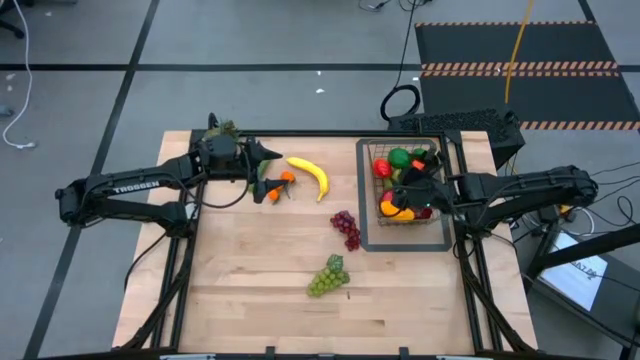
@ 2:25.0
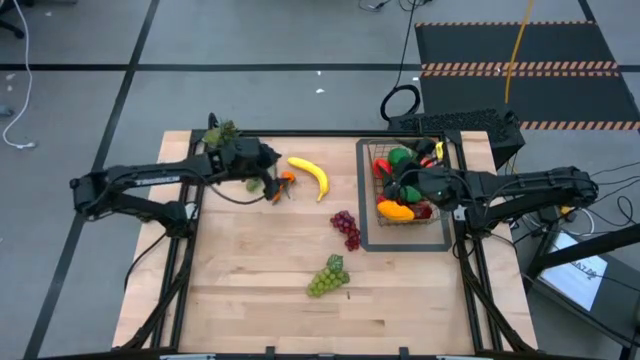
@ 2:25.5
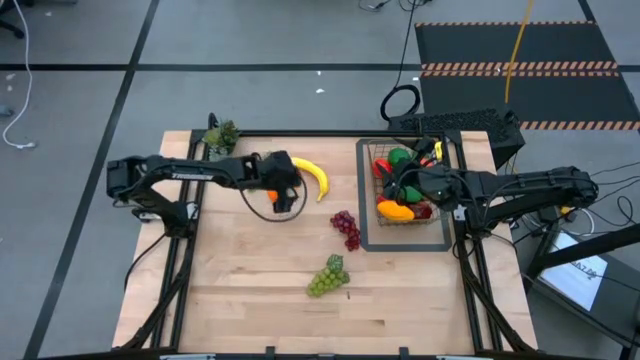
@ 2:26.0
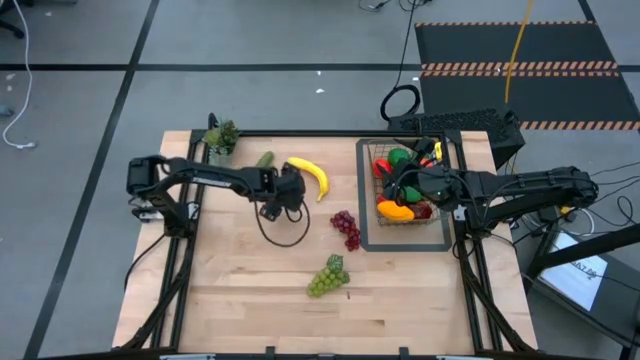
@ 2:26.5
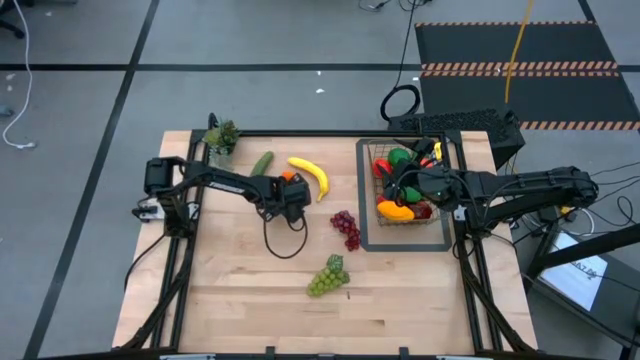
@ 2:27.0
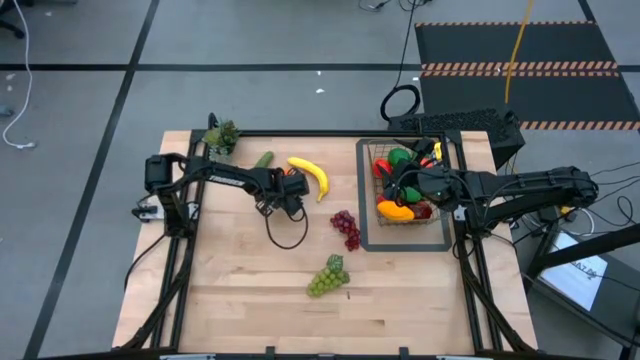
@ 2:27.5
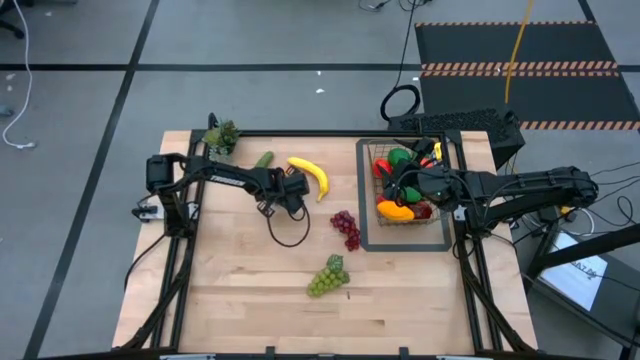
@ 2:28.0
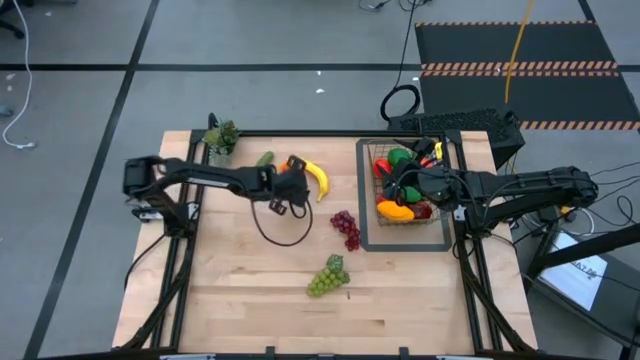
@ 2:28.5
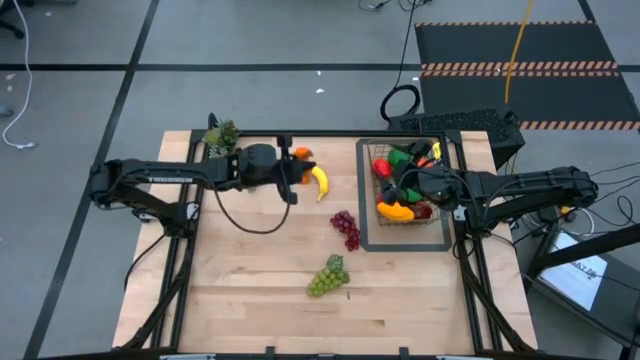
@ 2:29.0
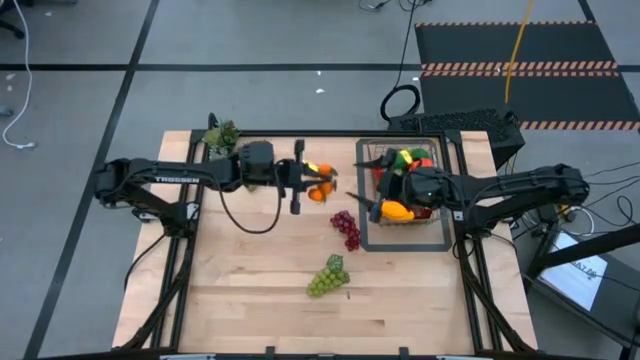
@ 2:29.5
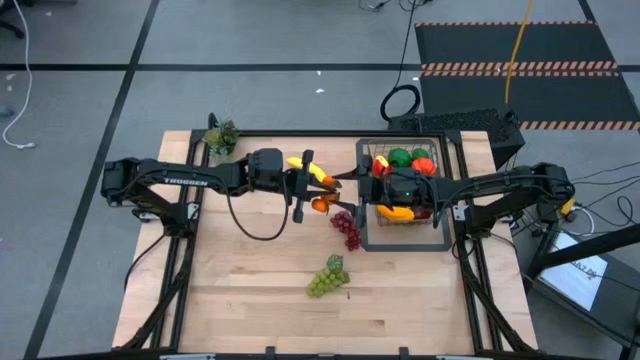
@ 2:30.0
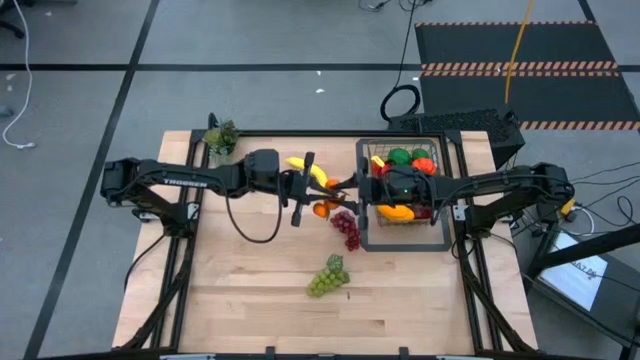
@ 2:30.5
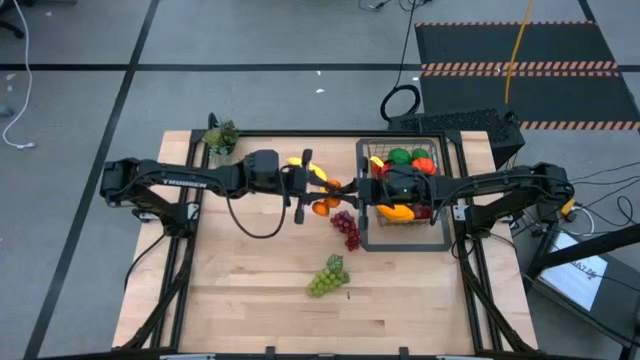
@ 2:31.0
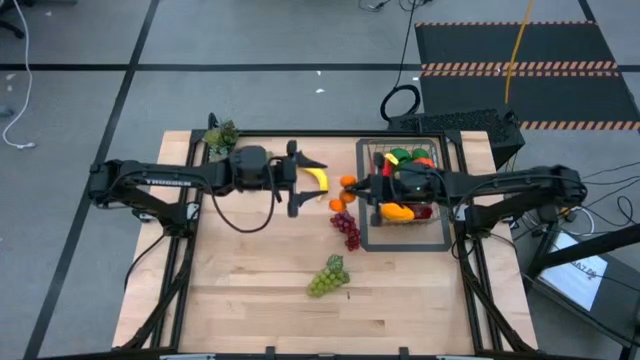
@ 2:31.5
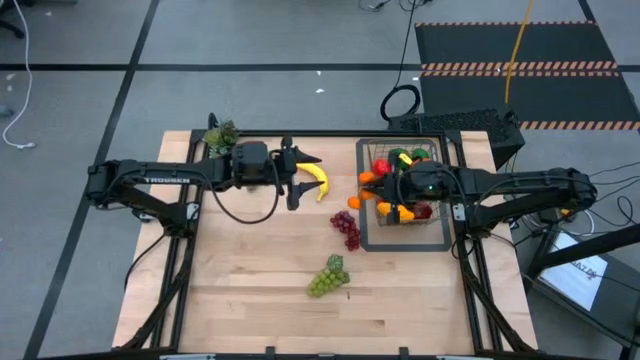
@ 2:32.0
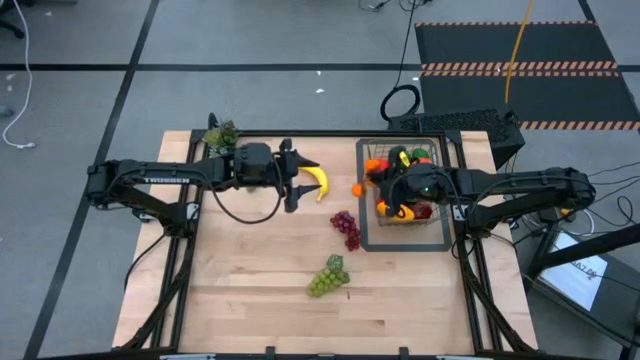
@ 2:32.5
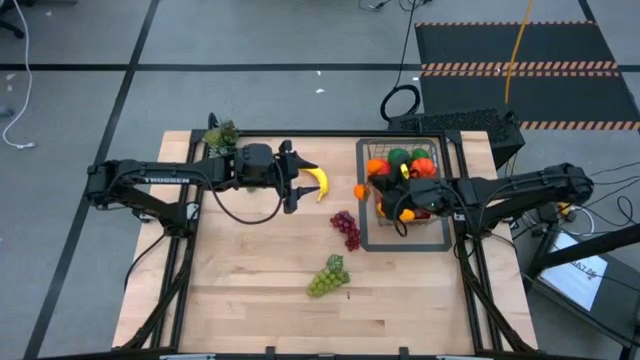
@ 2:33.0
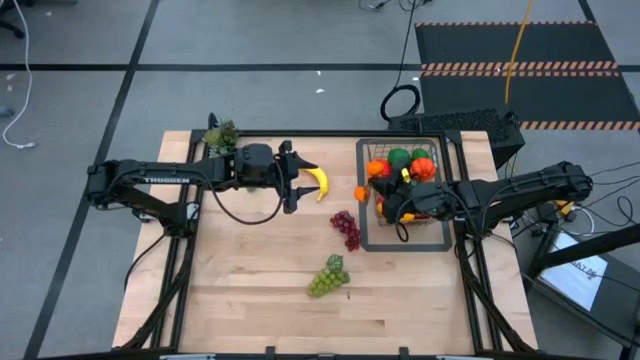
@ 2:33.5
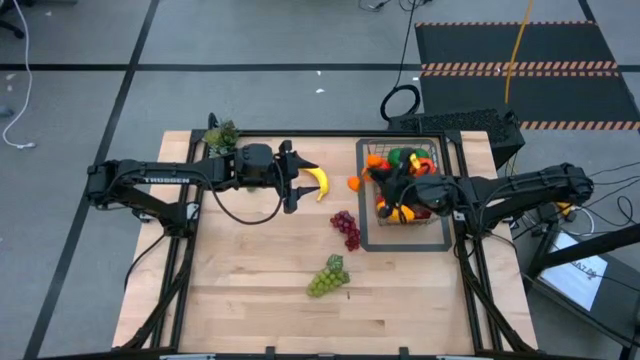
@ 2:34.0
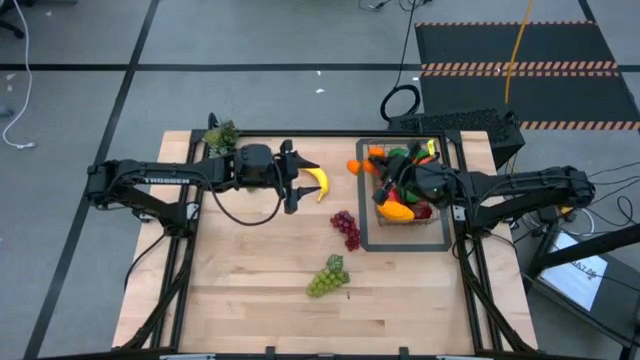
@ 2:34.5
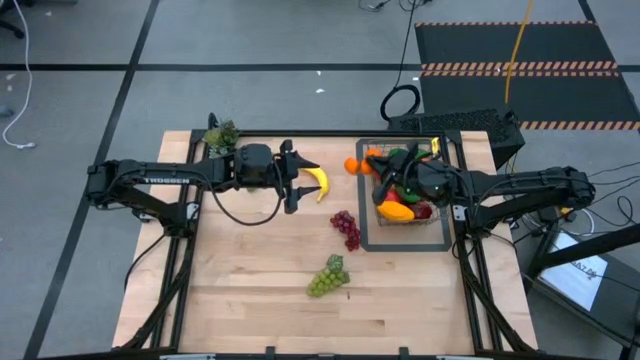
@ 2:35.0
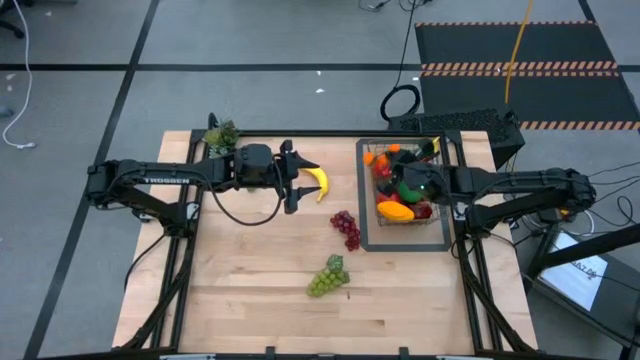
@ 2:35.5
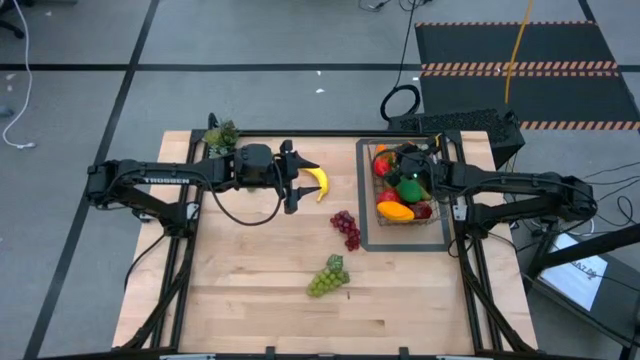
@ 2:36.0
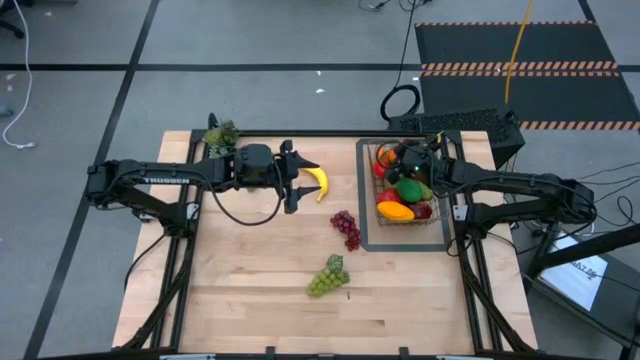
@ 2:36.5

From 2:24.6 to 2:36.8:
Task: Build produce basket
Put the tangerine into the gold wire basket

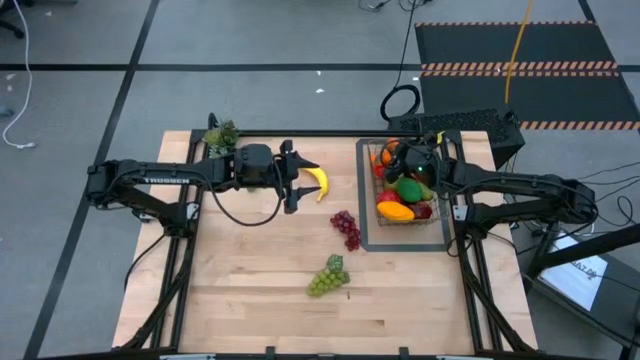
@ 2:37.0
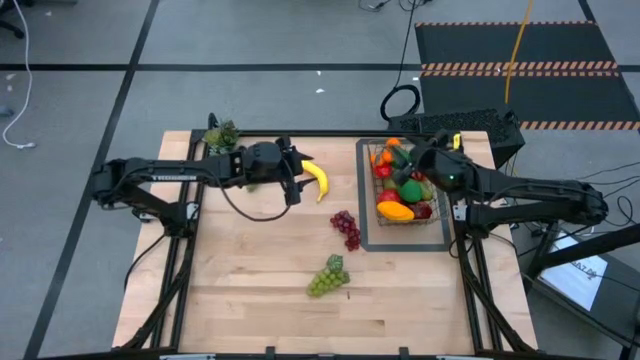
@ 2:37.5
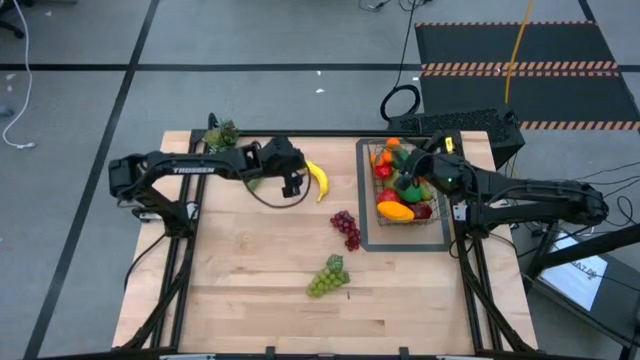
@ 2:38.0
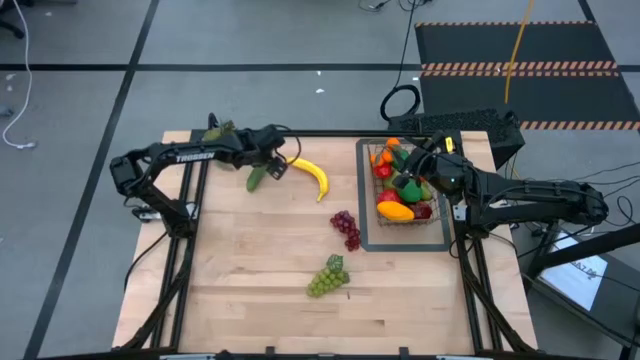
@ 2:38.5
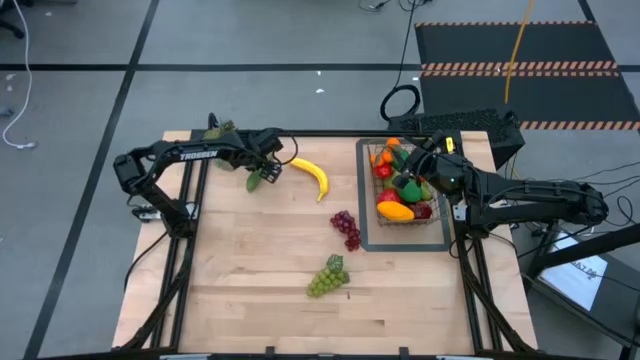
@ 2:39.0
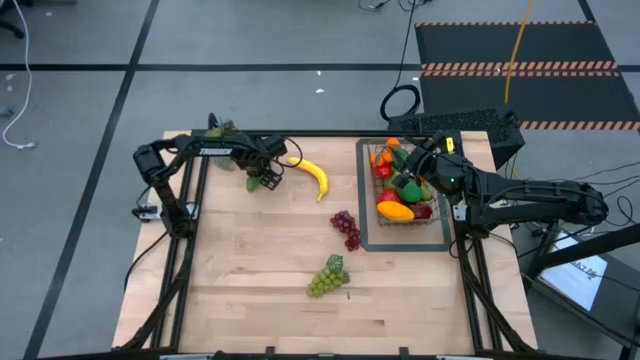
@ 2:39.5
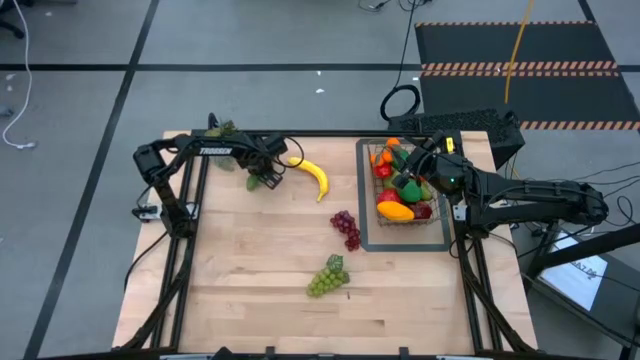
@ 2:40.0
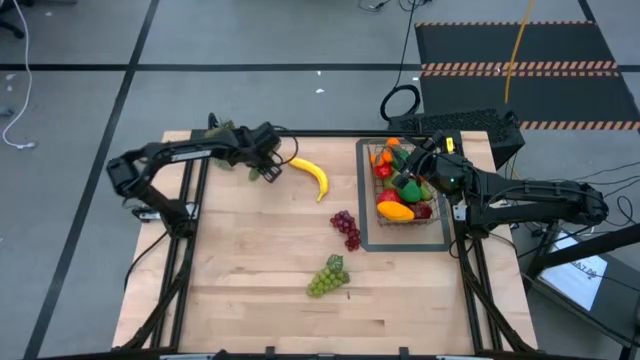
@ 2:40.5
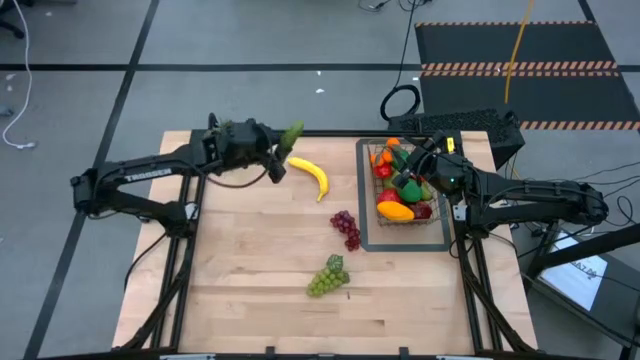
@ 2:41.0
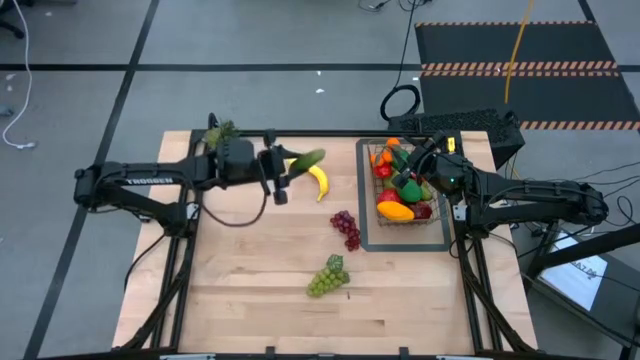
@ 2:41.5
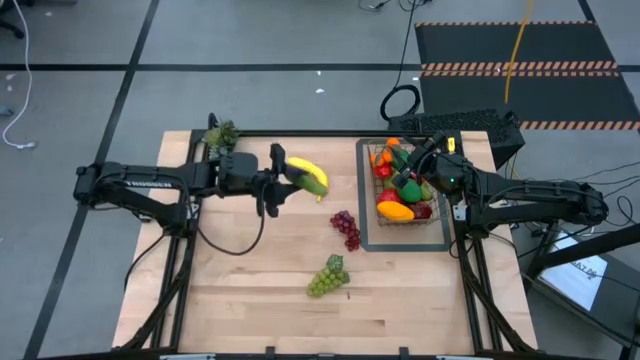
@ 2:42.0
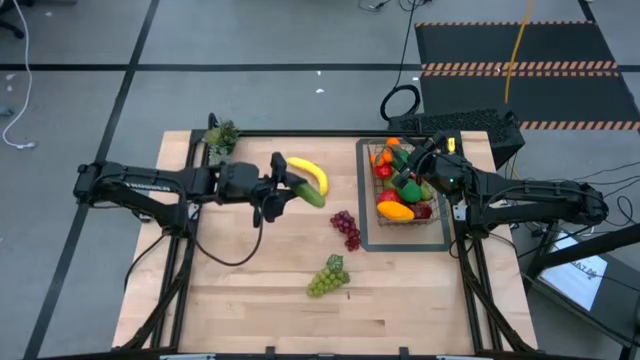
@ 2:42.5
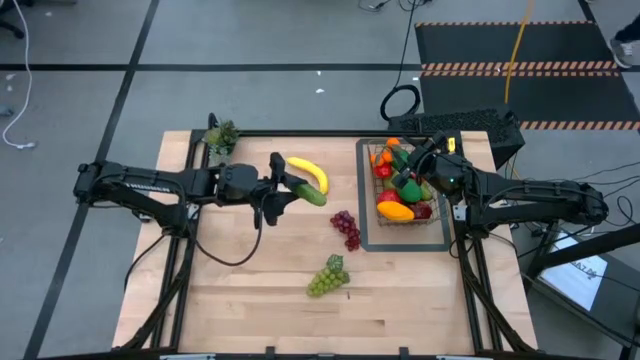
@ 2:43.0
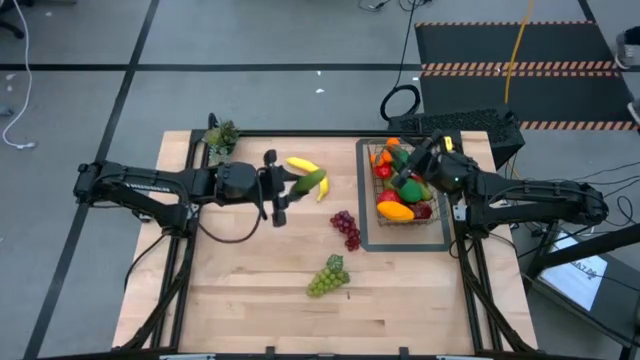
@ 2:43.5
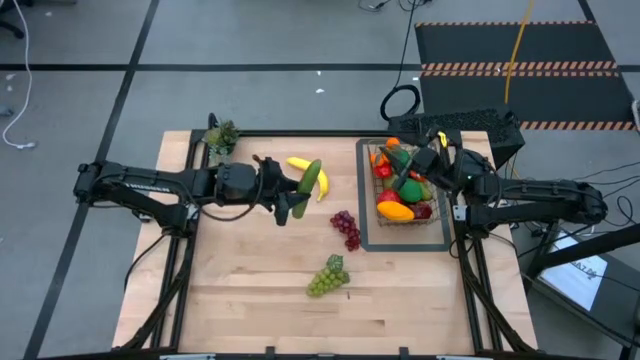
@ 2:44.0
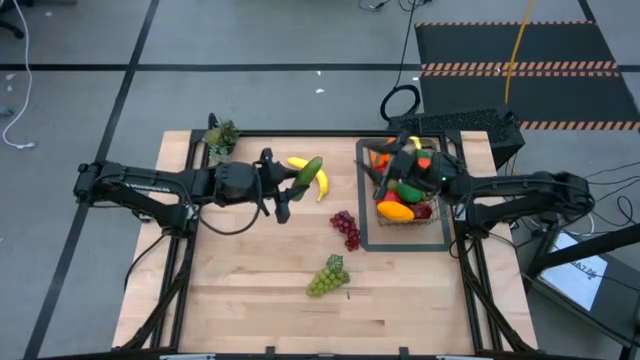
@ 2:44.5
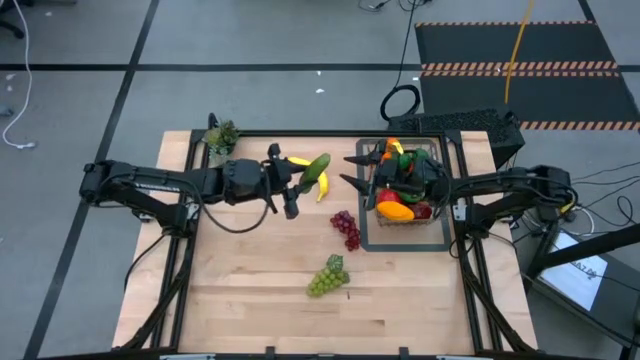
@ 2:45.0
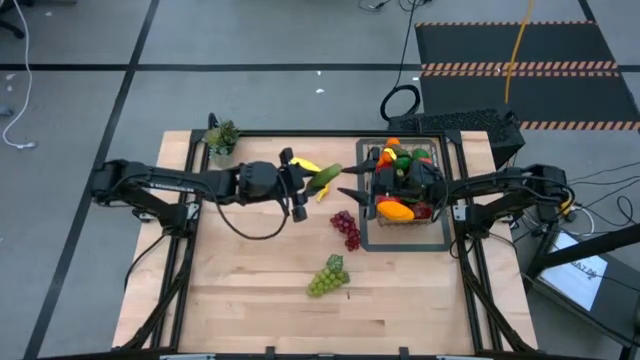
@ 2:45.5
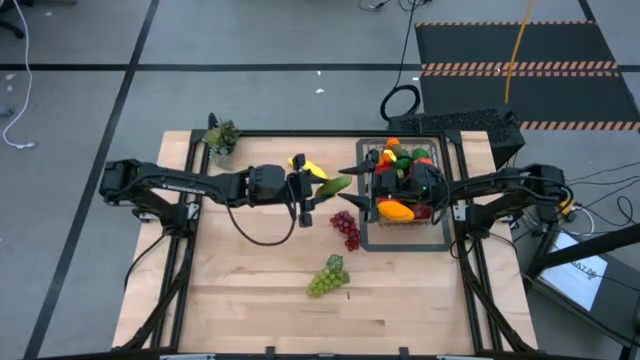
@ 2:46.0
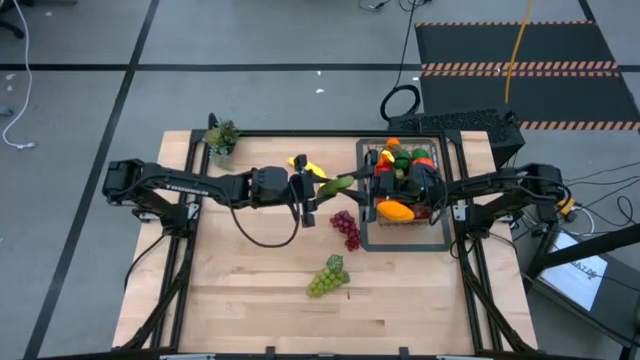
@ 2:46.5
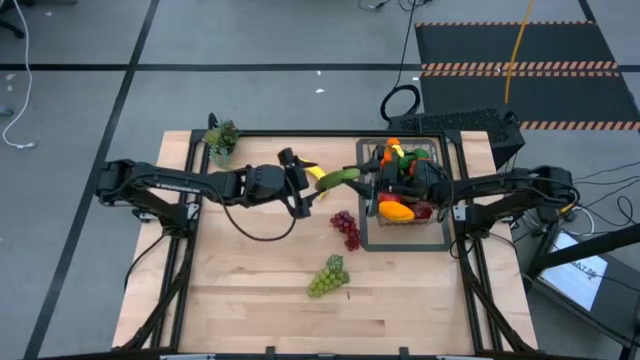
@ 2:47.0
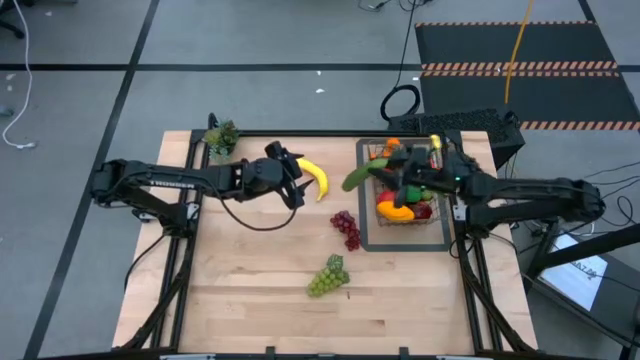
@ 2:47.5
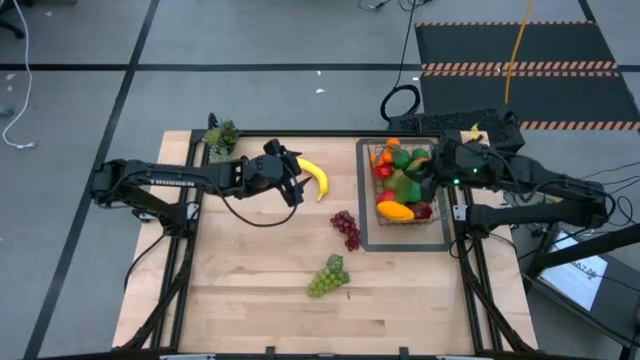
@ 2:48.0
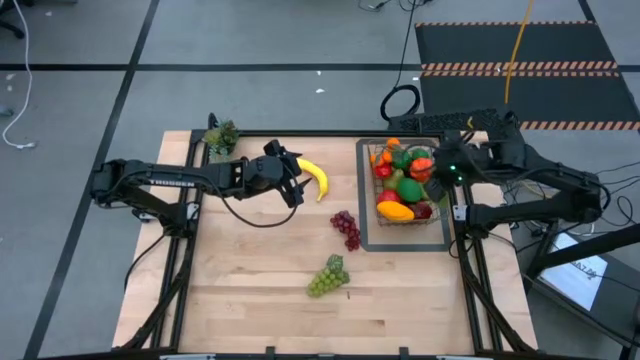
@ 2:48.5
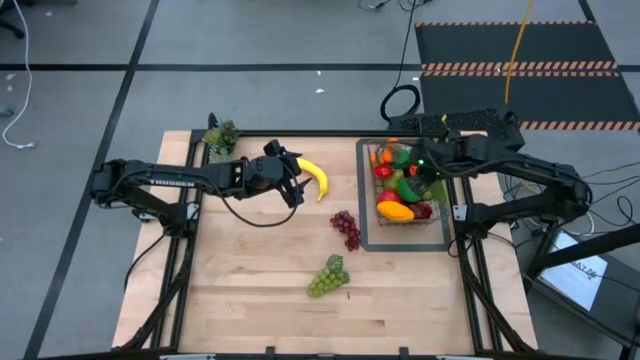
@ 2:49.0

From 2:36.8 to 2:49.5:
Put the cucumber into the gold wire basket
